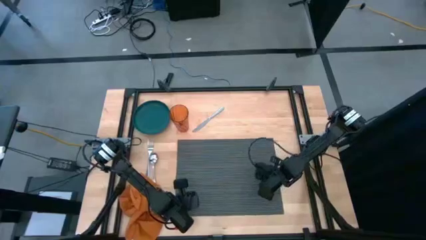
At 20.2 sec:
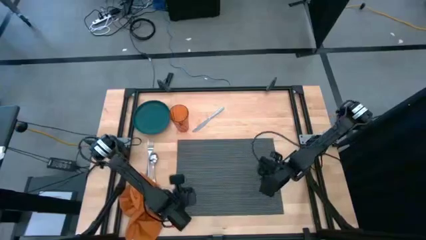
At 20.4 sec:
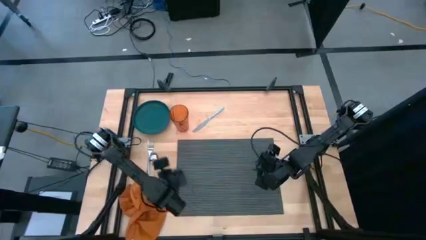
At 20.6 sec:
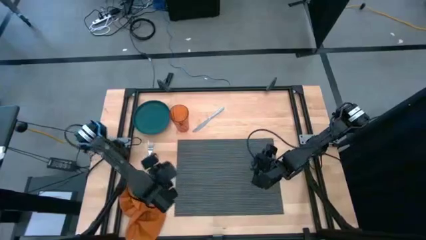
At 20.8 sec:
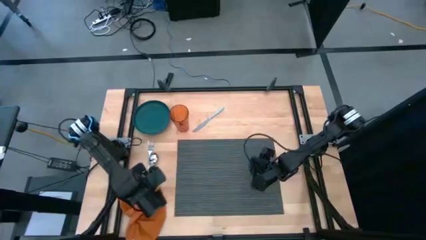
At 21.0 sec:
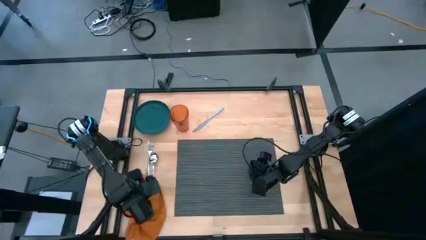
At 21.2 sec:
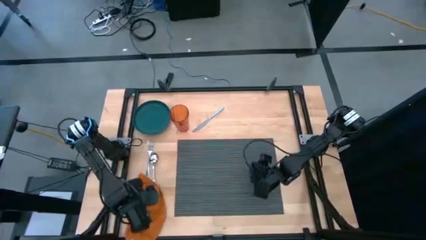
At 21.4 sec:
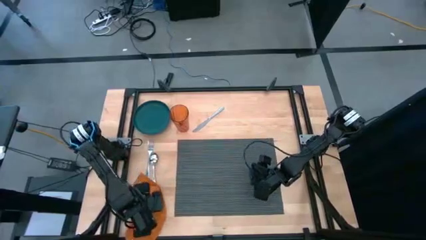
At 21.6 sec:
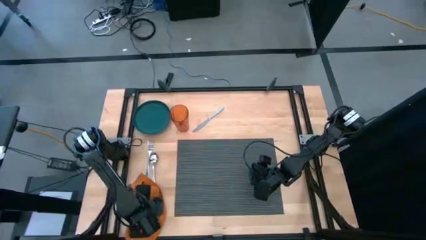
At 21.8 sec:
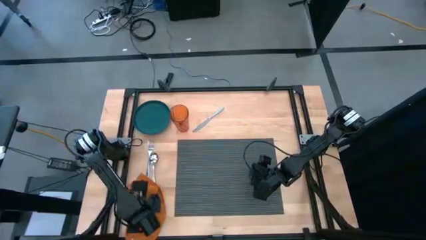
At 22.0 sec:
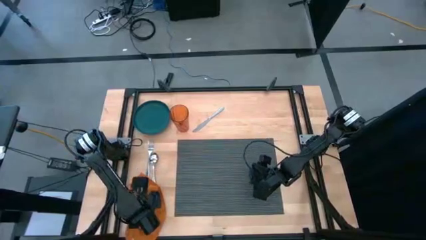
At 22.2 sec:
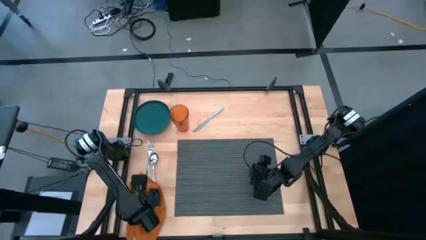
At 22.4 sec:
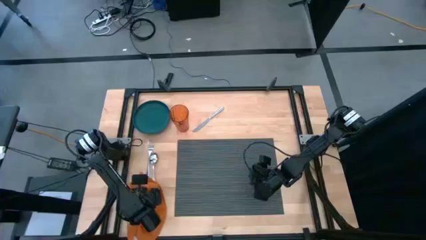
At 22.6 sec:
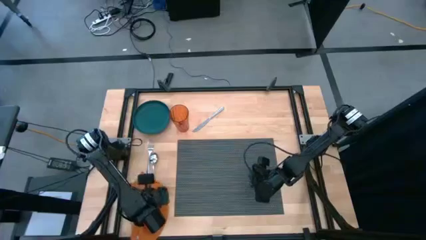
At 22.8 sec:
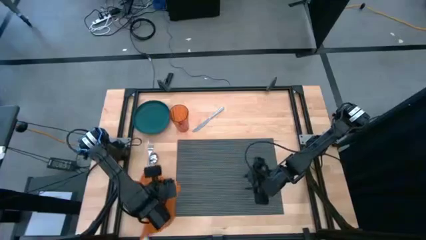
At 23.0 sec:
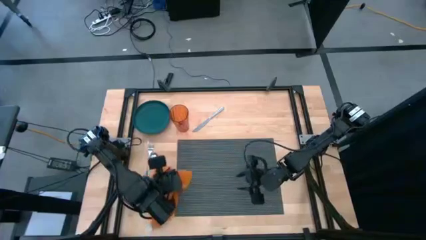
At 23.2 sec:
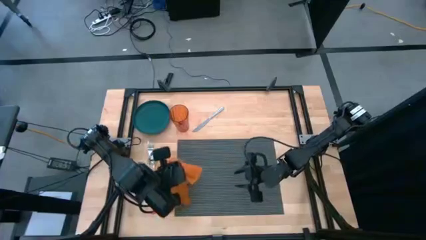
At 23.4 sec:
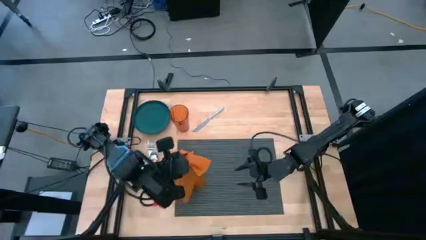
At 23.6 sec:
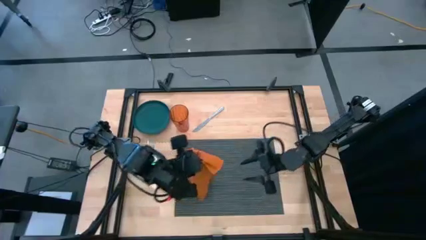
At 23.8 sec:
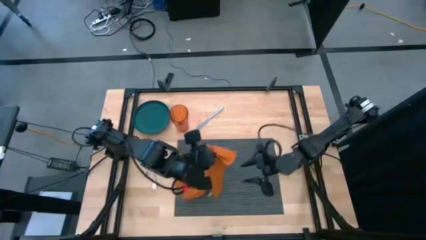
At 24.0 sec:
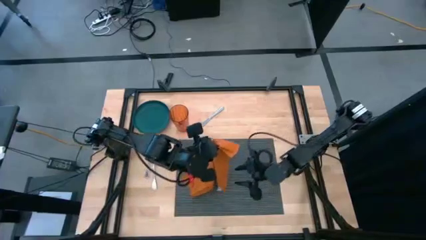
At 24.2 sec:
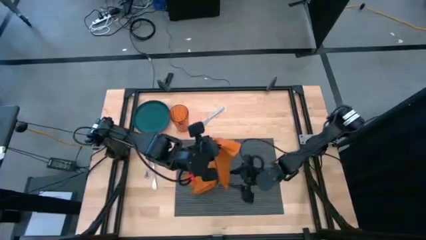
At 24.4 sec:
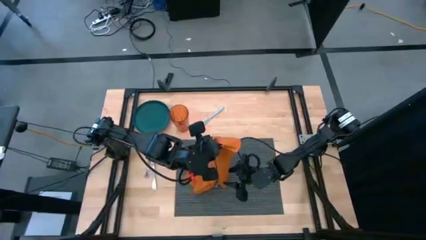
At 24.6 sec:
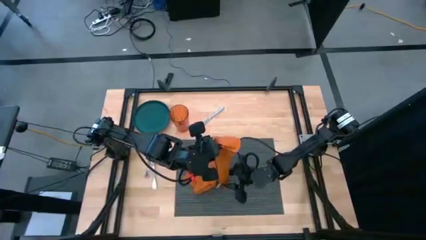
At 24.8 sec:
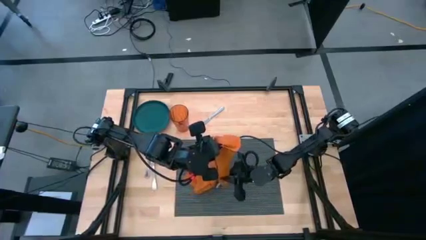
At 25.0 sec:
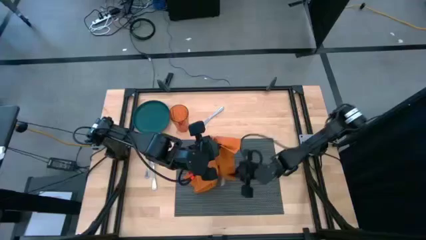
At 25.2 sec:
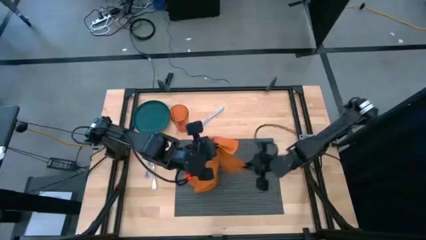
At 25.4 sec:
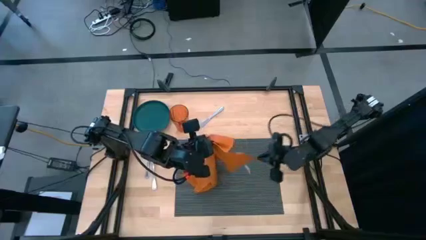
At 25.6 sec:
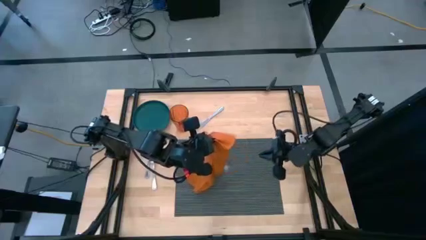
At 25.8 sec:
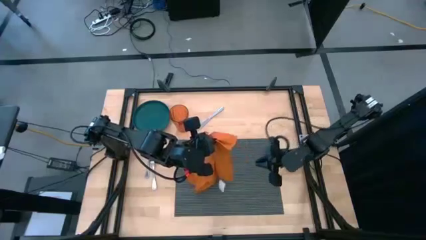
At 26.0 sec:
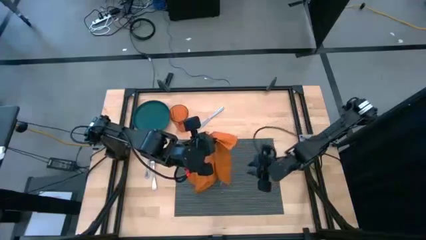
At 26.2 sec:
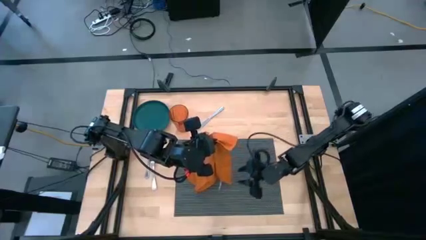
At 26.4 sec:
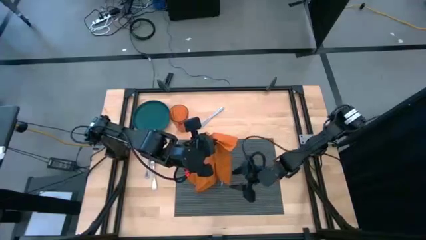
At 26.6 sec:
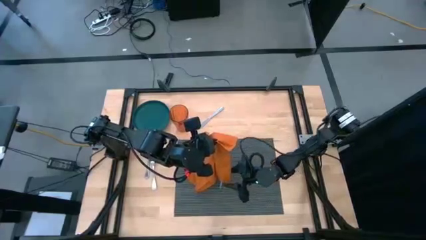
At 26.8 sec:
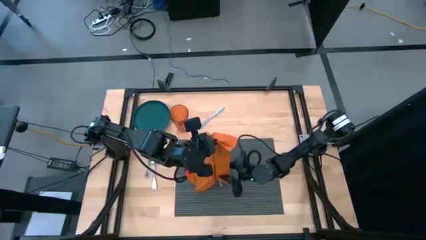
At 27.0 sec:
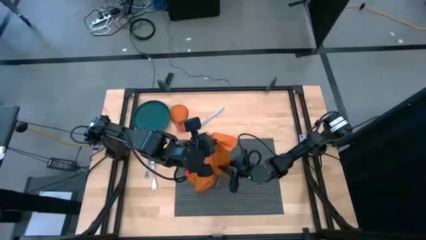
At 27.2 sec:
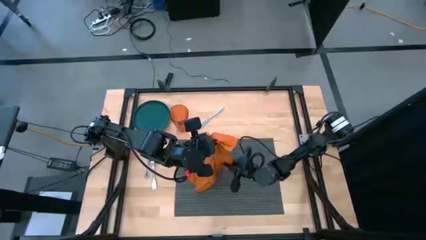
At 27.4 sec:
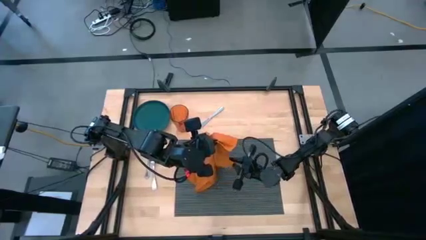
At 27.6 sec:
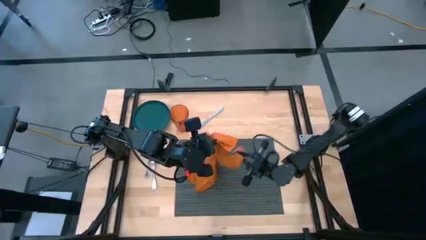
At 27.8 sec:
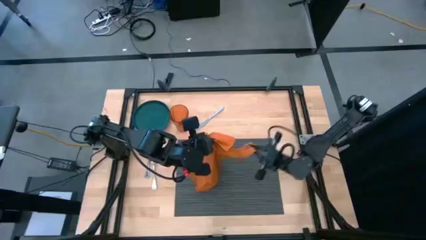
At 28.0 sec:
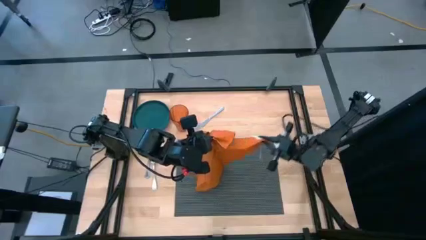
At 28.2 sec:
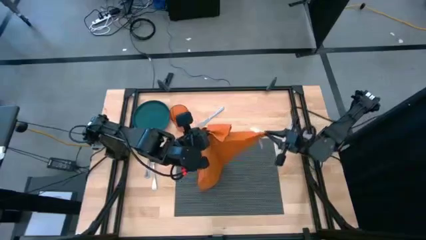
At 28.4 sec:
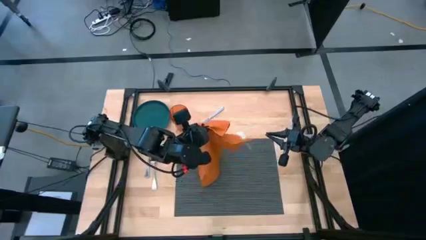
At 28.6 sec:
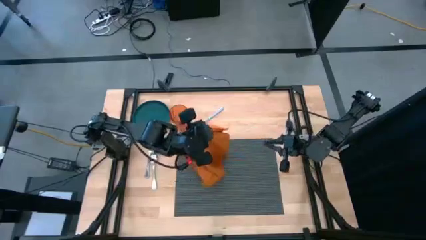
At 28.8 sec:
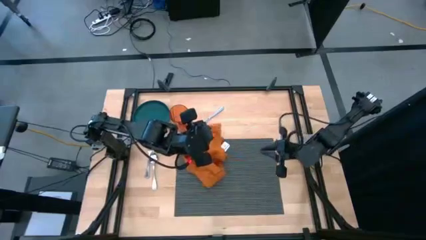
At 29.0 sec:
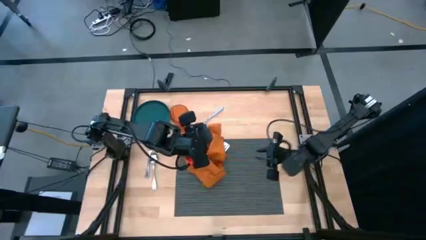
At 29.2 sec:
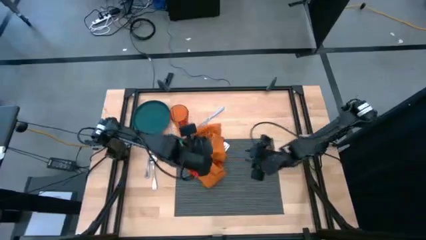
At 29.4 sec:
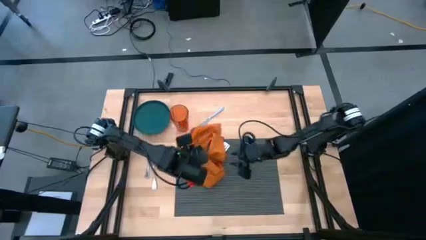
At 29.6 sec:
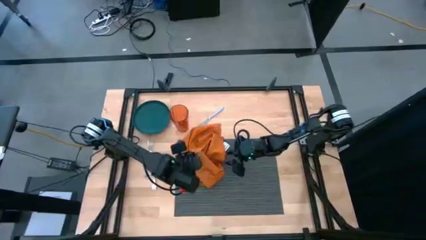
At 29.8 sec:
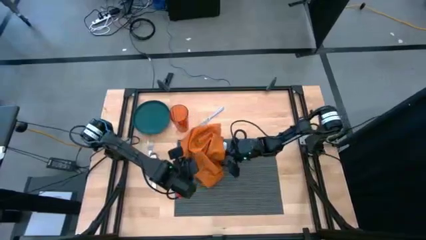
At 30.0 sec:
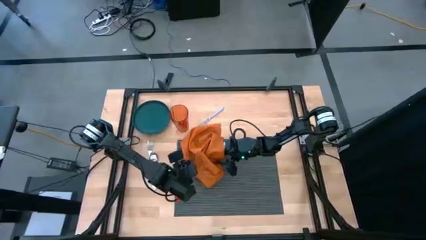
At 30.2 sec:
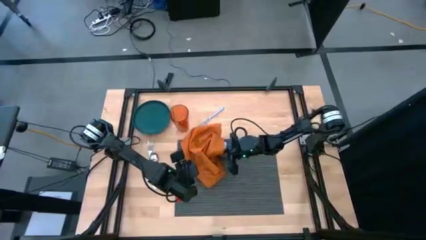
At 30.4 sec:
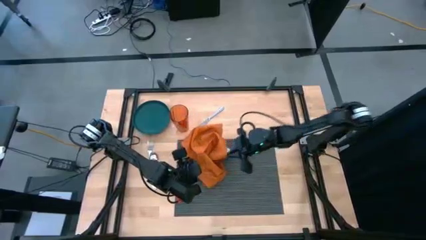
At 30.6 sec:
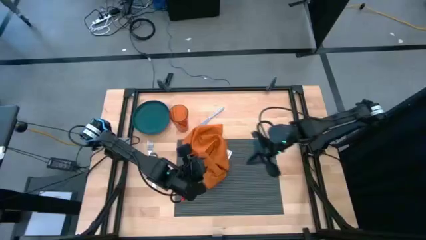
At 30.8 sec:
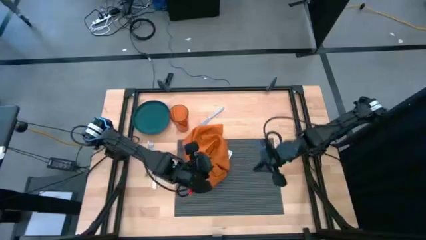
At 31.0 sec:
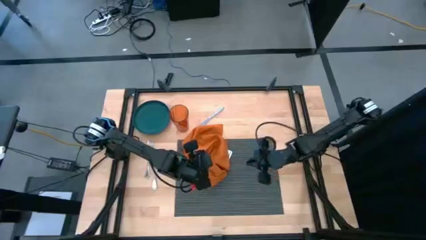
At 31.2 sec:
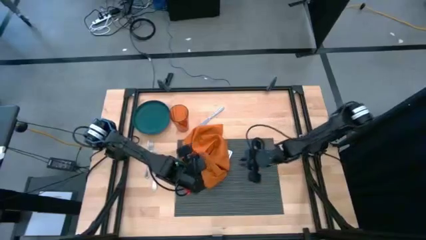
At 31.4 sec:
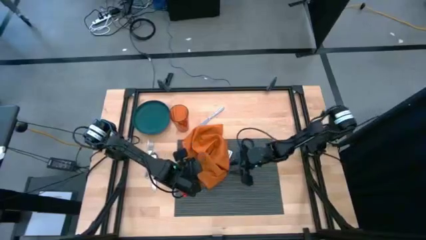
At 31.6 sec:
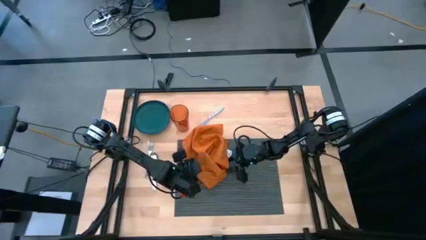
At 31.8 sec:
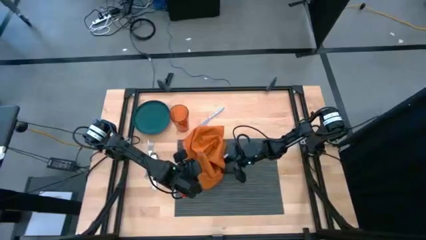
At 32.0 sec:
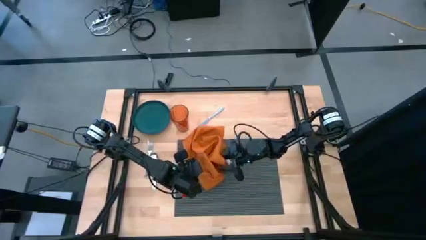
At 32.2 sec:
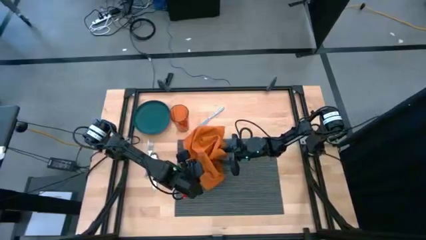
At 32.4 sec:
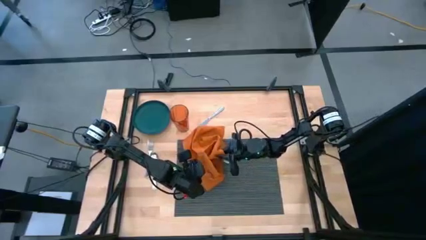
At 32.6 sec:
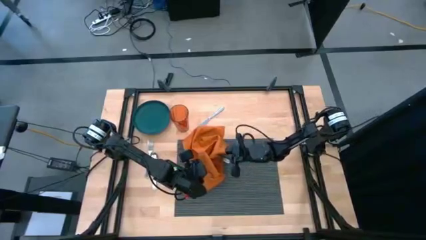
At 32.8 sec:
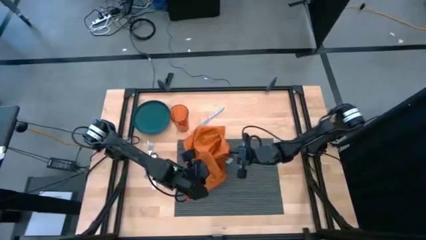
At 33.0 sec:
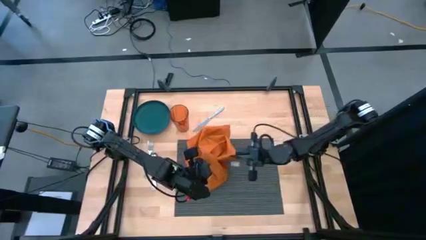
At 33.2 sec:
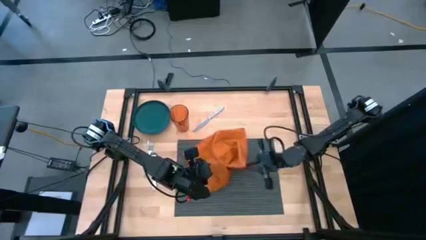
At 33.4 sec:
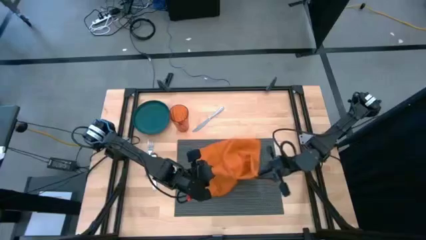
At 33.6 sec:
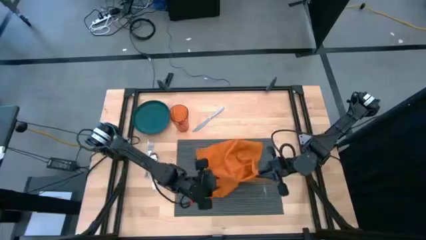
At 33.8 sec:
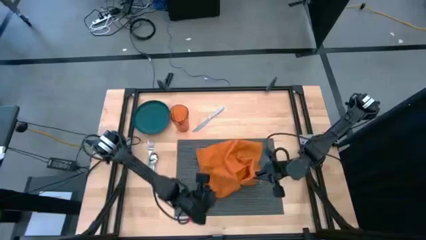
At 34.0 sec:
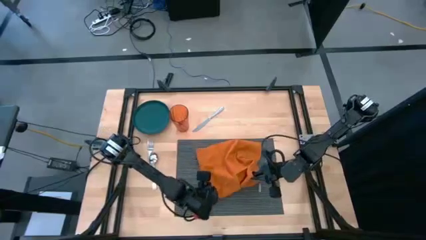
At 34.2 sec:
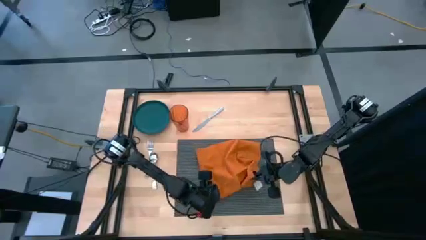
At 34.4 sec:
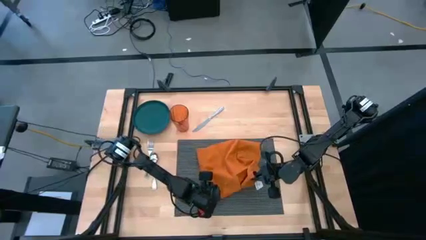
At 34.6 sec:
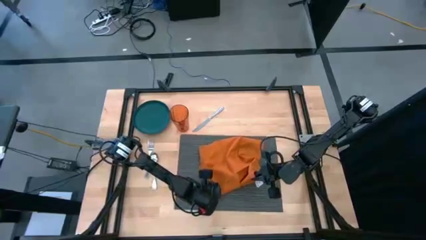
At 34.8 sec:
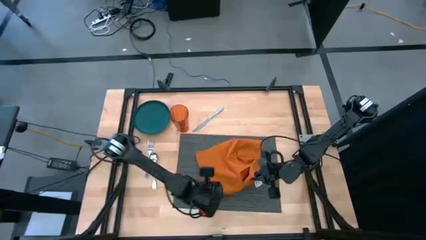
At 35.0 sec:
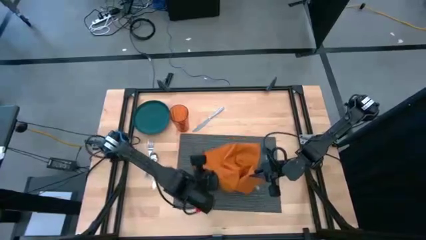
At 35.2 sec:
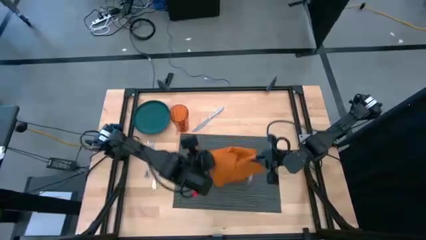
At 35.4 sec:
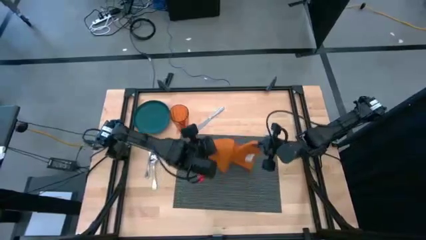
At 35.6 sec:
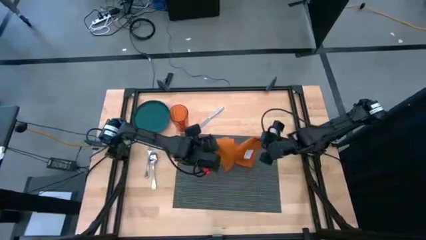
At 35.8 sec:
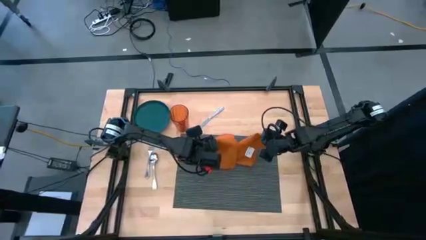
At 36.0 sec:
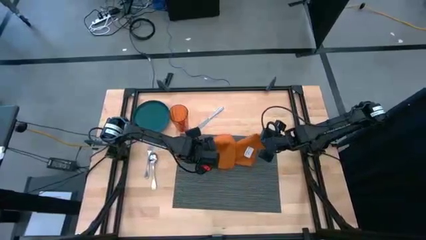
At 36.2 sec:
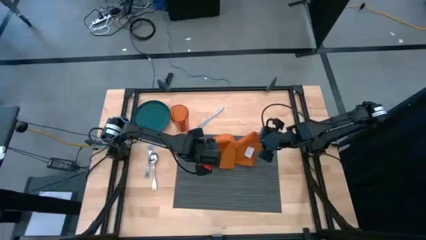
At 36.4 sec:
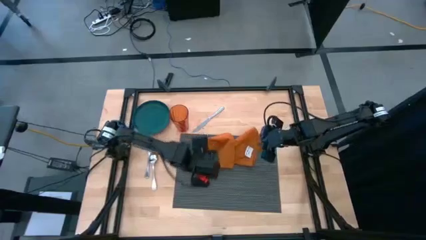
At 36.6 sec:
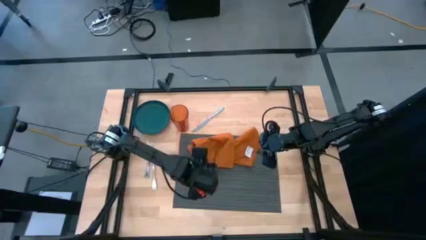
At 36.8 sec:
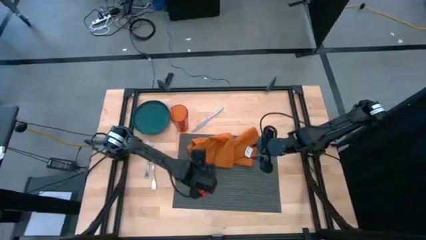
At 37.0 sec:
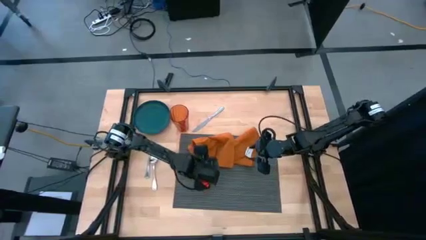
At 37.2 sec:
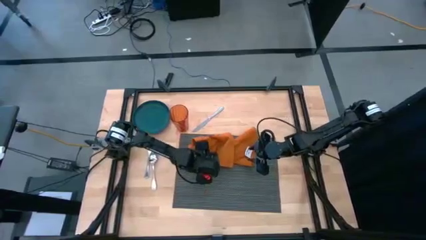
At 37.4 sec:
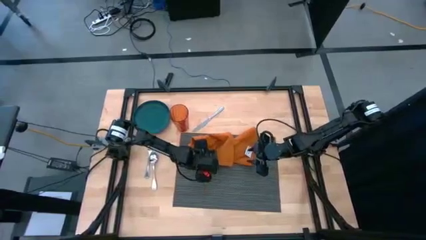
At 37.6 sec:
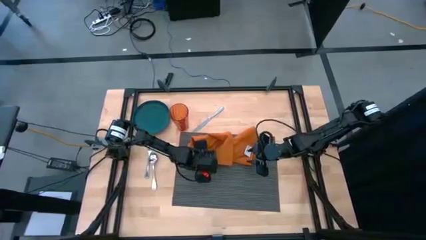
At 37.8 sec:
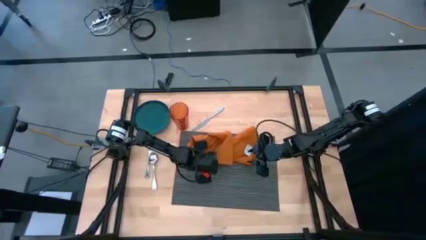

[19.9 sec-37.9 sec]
Task: Set table place
Fold the orange table napkin on the black placemat
